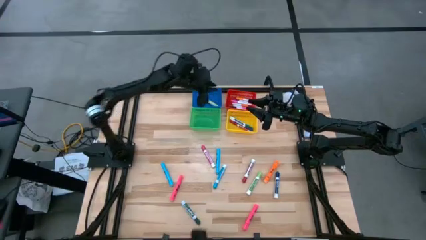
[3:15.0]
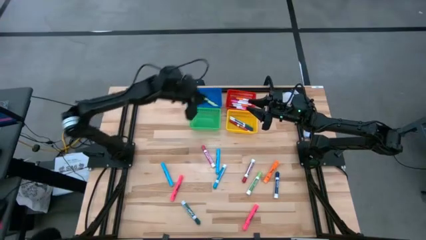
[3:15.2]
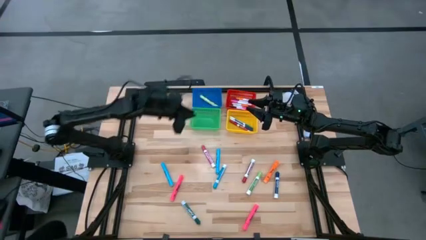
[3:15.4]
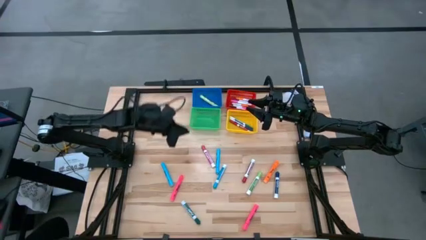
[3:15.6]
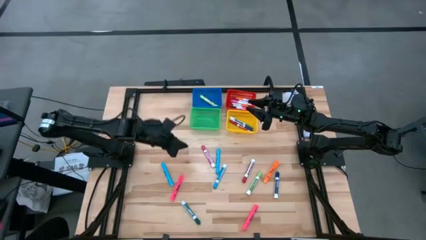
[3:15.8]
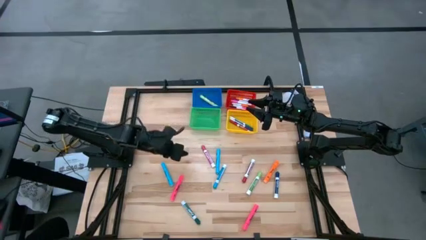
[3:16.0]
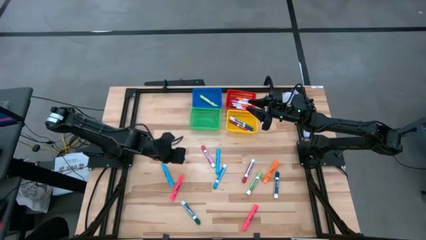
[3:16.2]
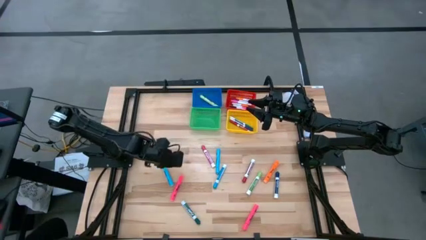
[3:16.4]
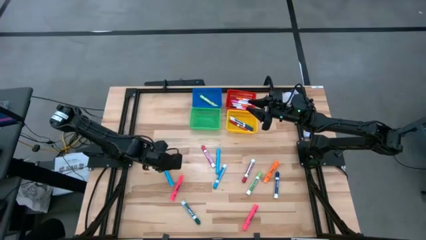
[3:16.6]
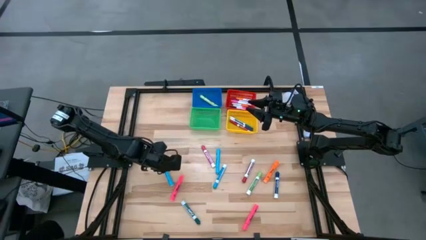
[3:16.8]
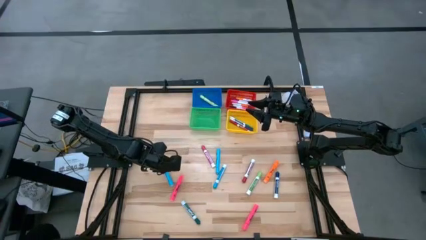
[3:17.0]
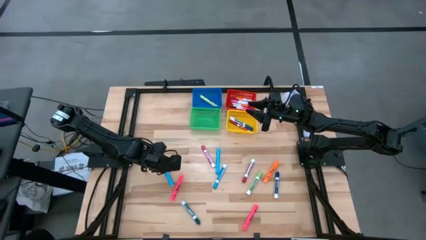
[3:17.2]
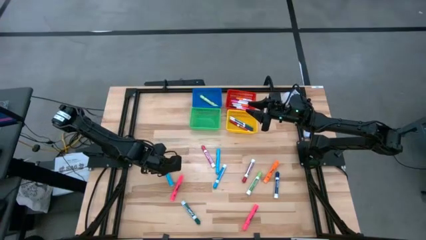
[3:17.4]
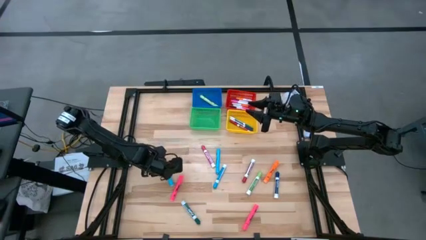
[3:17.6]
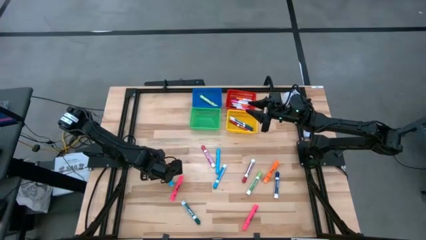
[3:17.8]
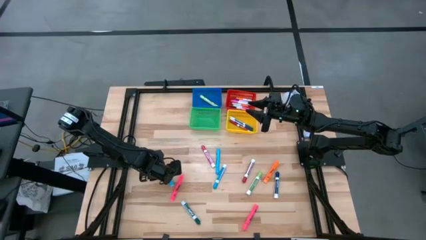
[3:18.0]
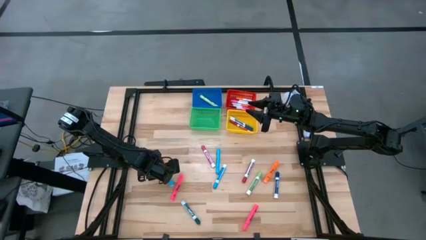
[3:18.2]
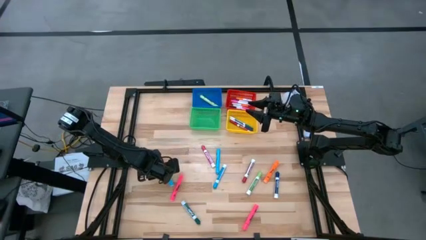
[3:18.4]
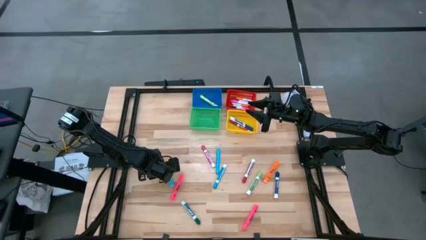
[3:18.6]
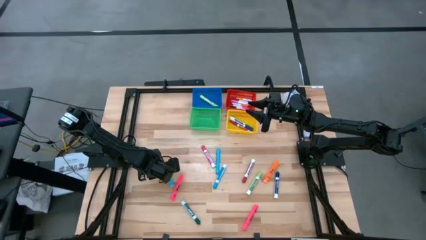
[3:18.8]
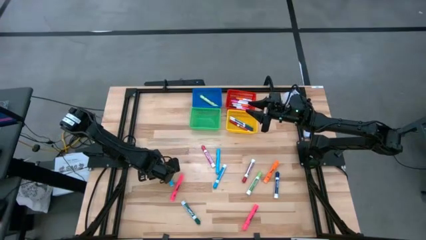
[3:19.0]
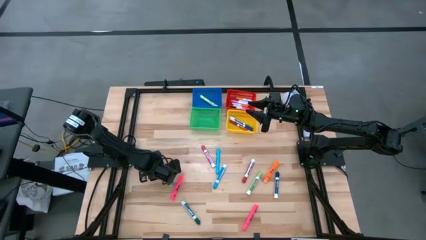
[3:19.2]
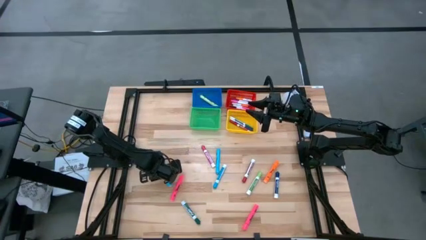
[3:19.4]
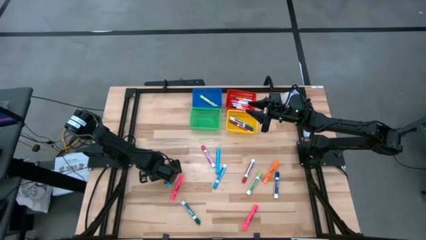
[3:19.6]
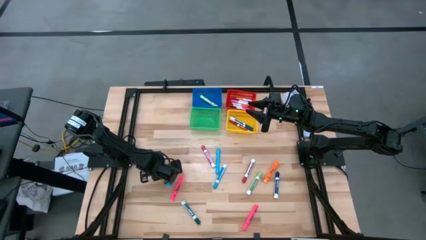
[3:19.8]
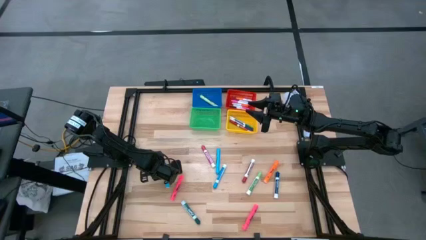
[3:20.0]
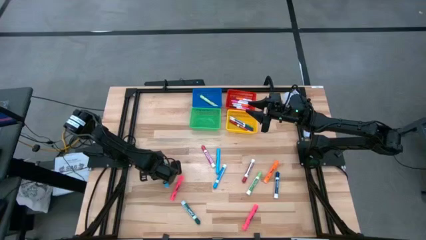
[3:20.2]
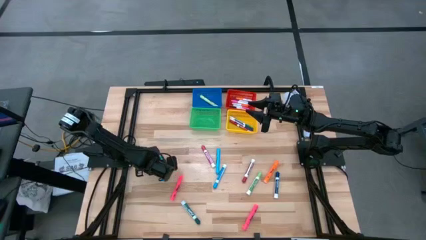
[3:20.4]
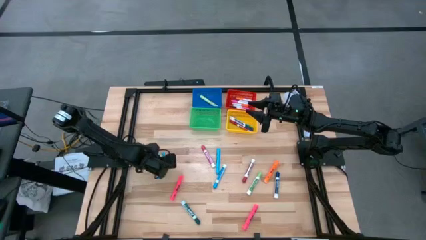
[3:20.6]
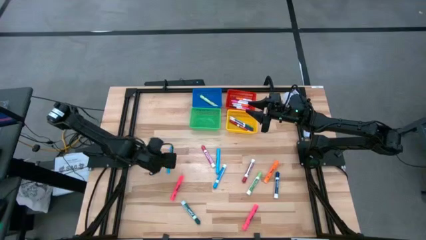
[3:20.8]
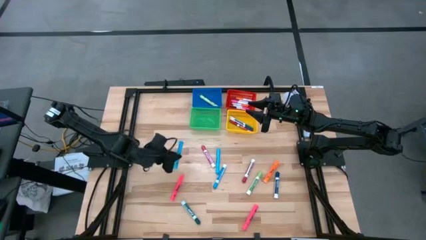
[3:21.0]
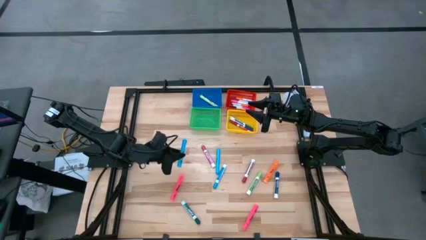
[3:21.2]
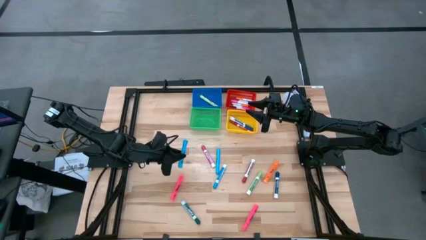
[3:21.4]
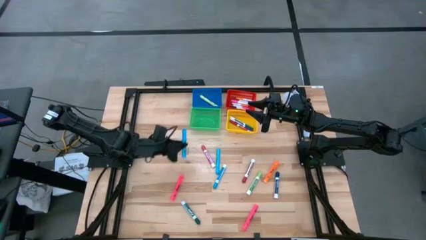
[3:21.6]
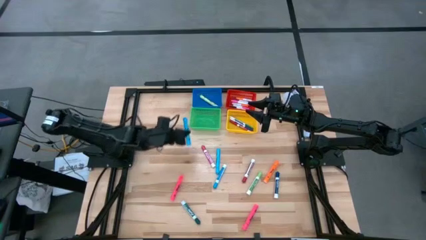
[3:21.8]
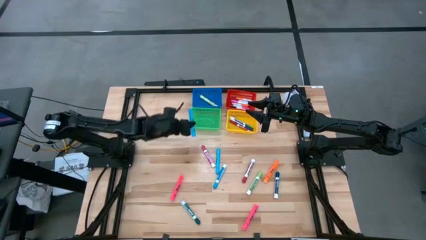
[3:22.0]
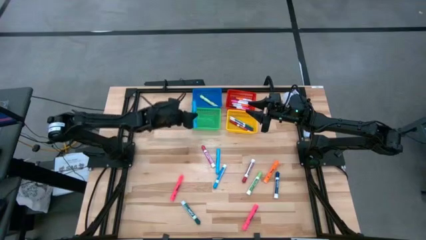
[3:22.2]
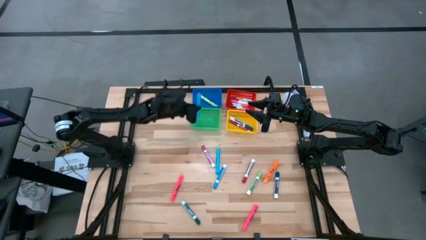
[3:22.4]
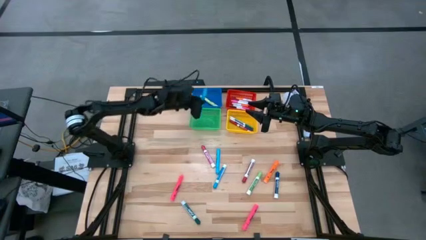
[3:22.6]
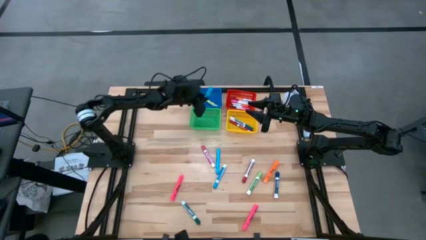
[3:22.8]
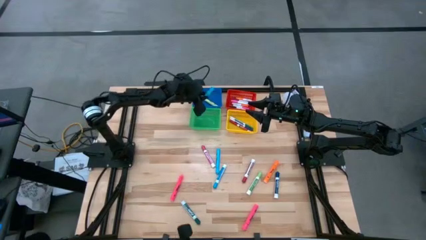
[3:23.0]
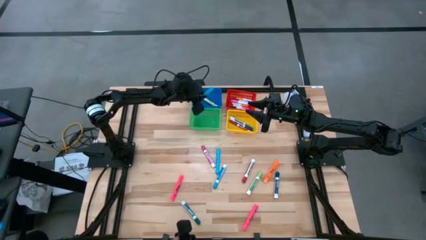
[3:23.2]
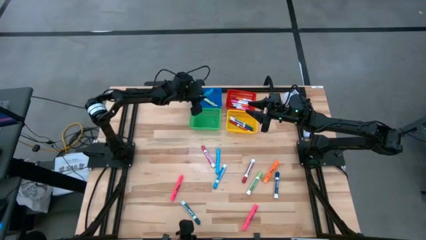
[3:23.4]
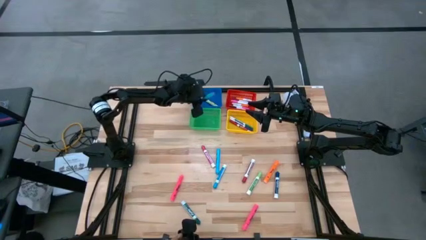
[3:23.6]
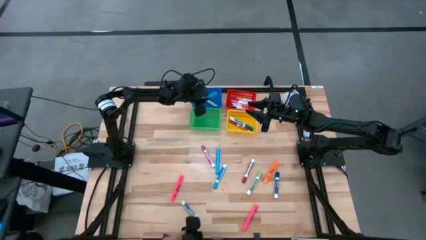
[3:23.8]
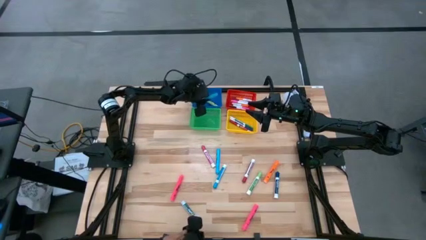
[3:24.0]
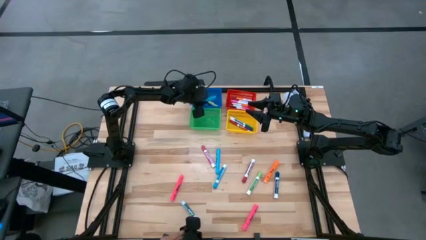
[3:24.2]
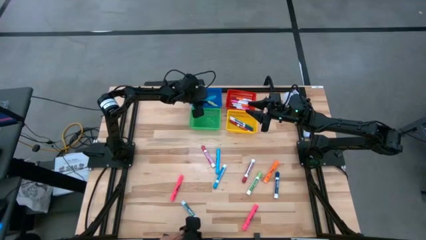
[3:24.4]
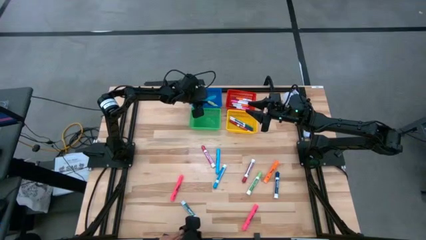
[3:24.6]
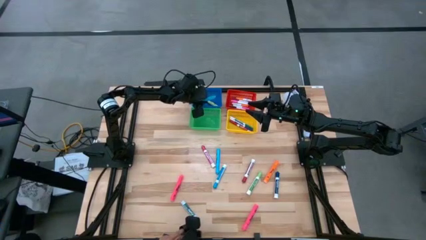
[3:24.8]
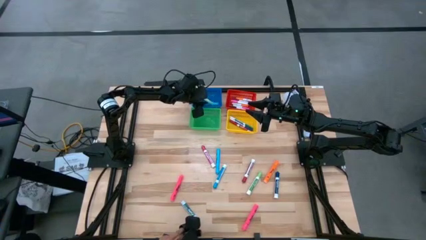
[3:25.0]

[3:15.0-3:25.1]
Task: Pick & Place Markers
Put the left blue highlighter into the blue basket
